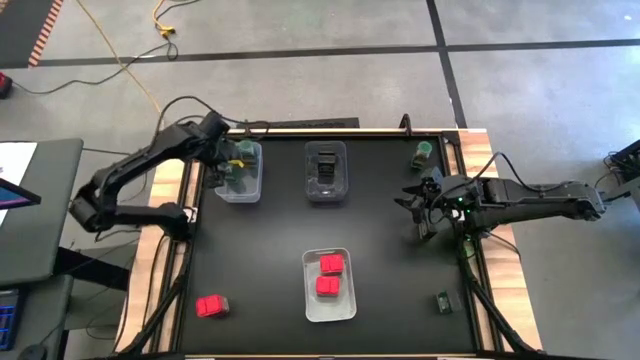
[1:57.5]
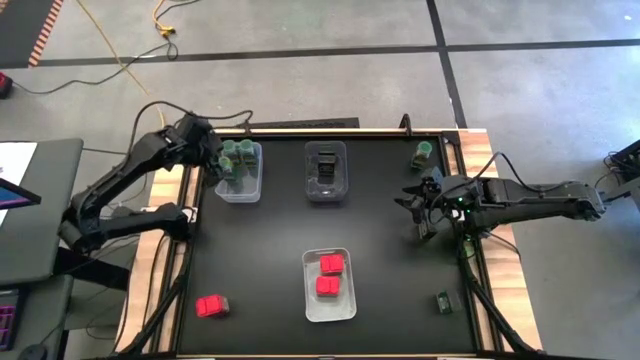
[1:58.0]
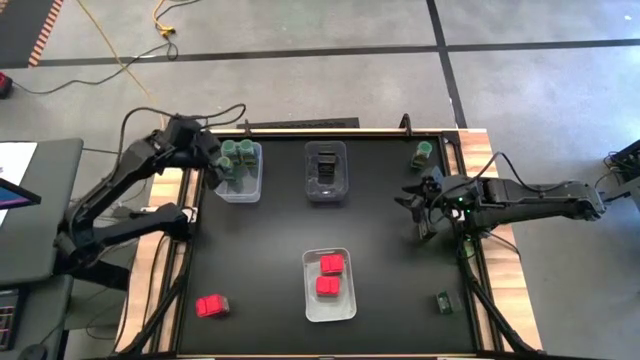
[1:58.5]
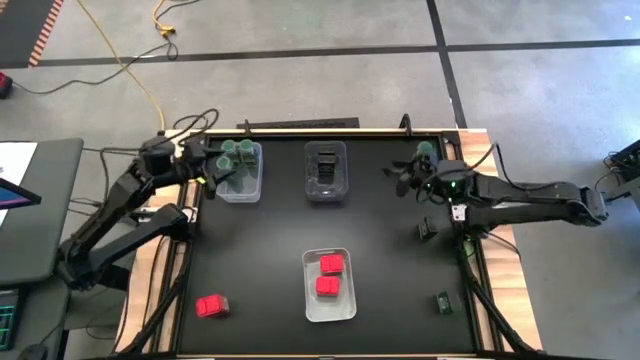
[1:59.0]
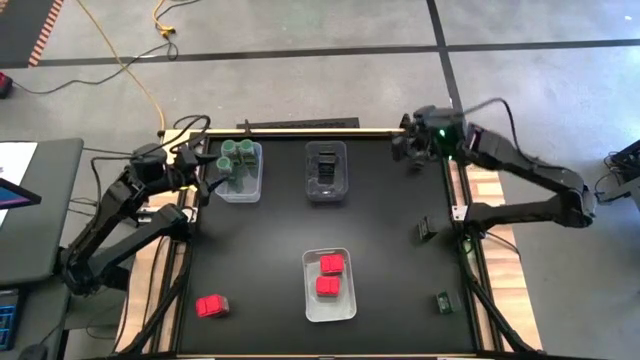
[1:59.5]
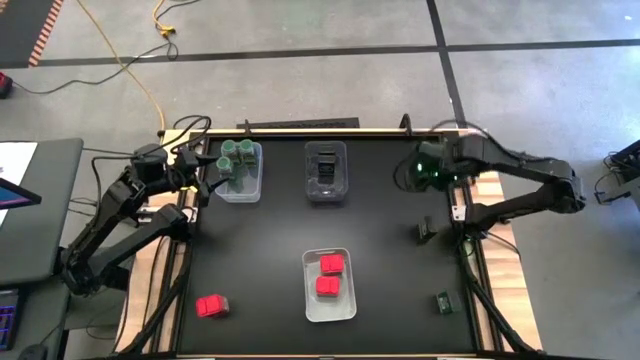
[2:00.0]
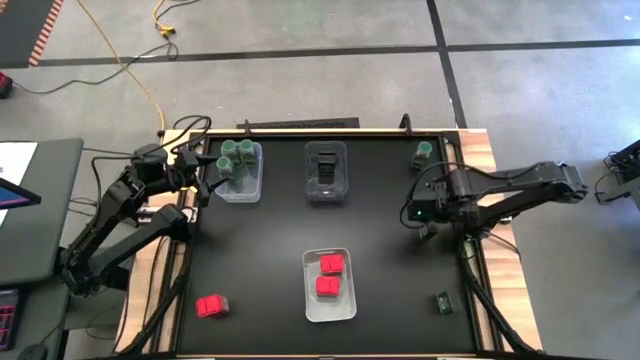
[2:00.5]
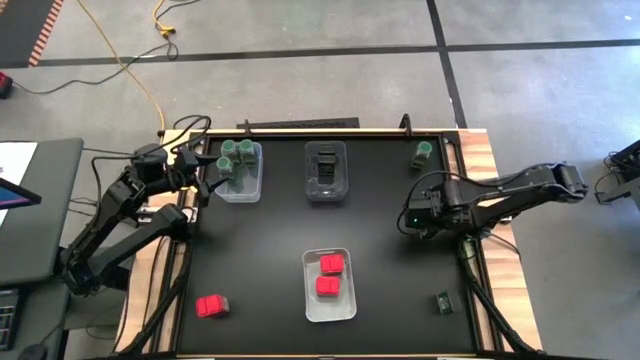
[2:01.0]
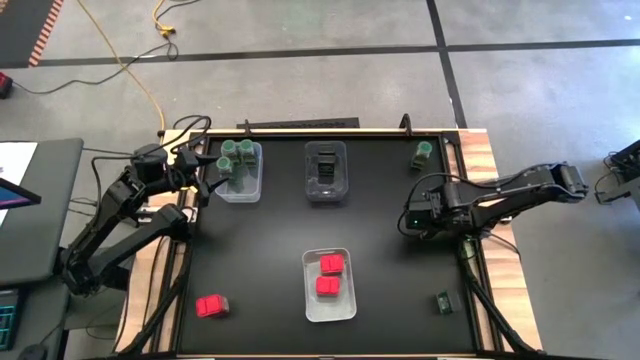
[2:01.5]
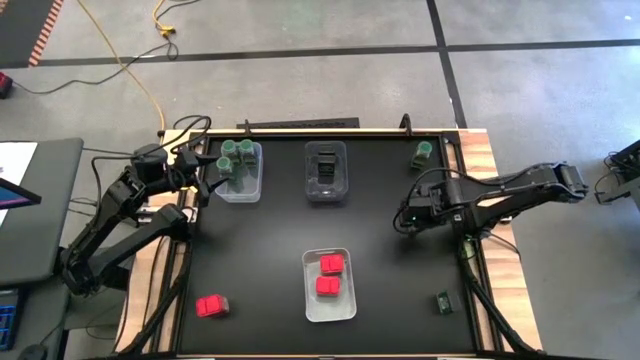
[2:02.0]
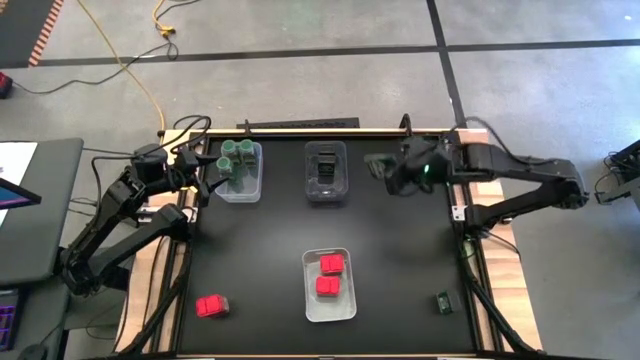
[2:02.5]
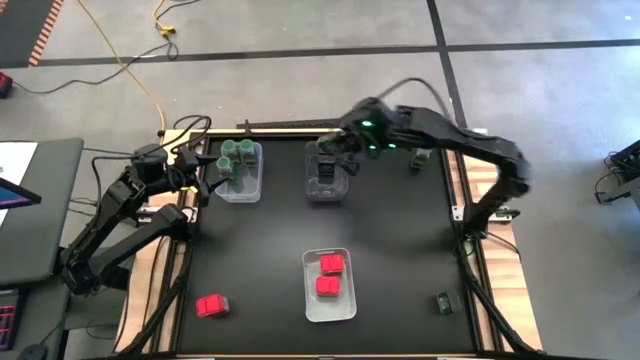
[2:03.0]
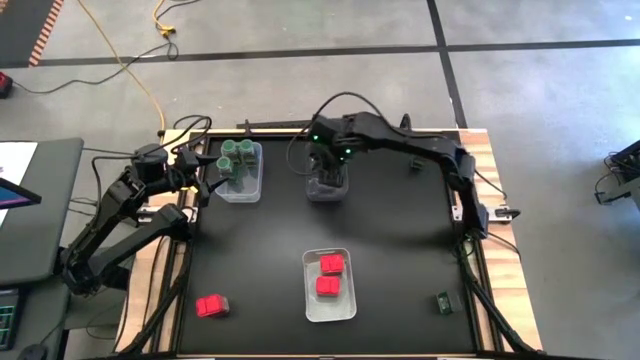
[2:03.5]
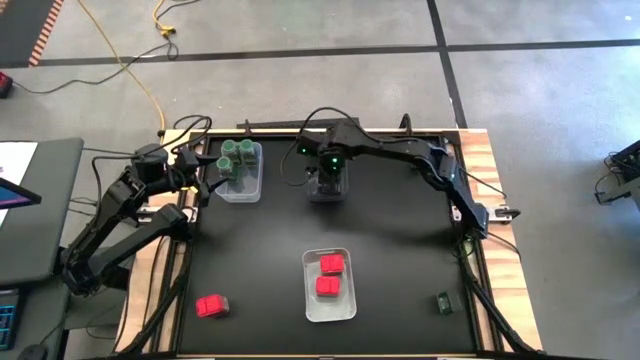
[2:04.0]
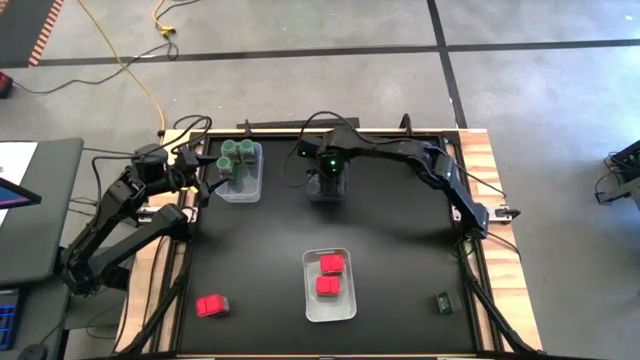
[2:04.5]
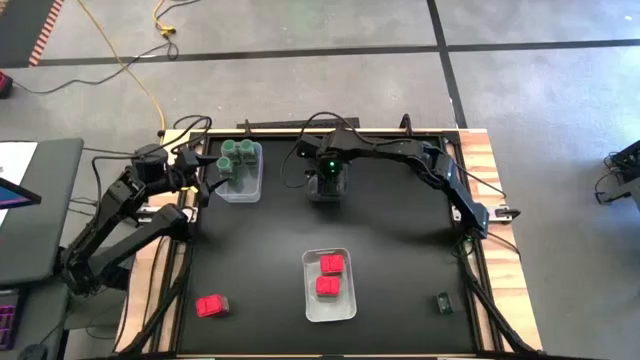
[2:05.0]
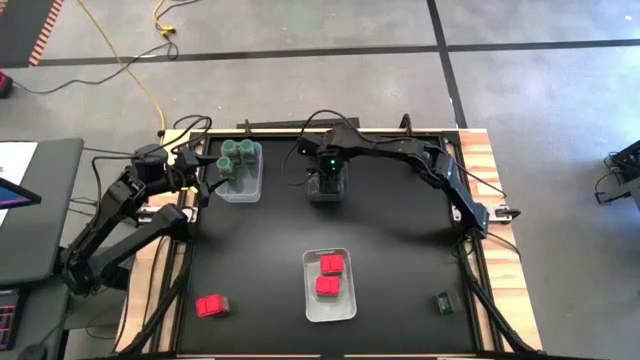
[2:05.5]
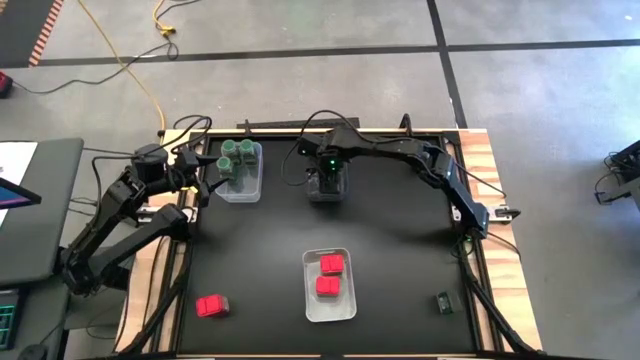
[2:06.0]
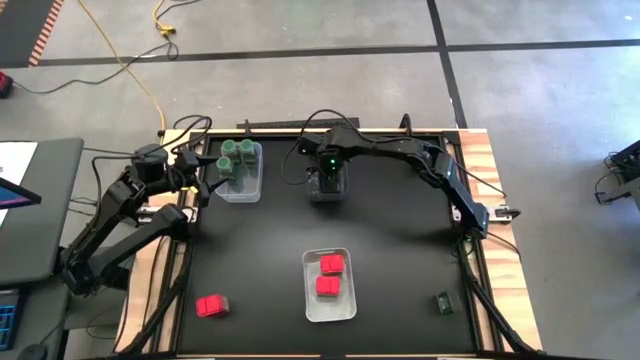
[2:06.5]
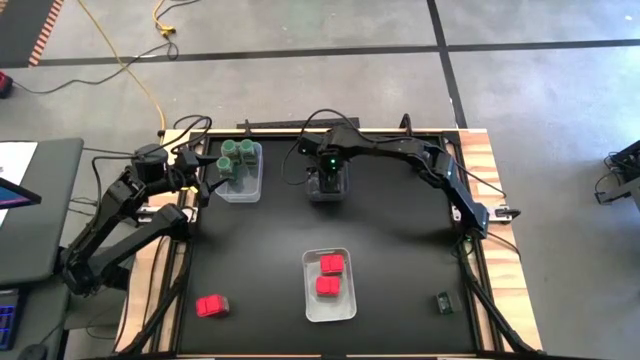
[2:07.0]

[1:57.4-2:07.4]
Task: Sort spices by type
Put the top black seasoning can into the black bin

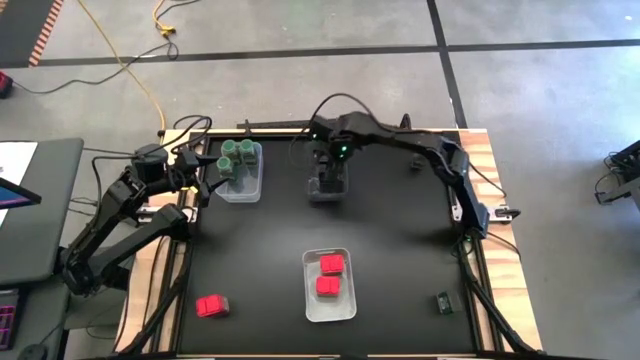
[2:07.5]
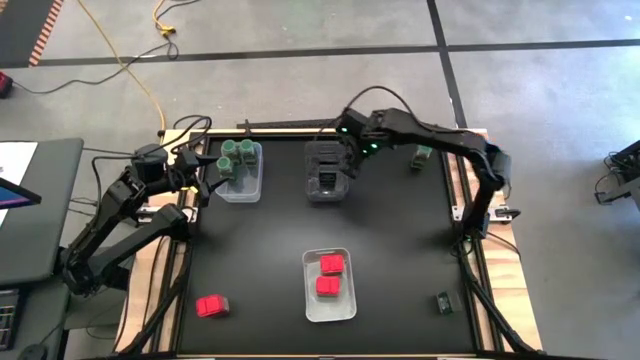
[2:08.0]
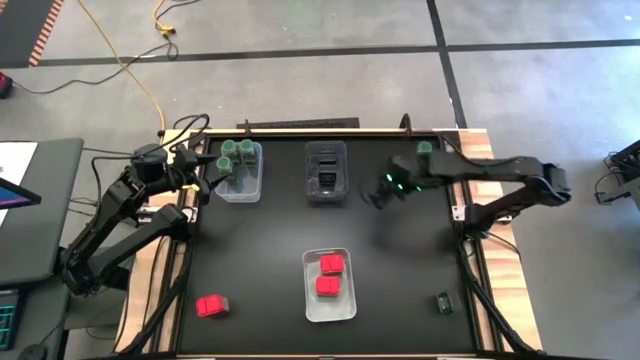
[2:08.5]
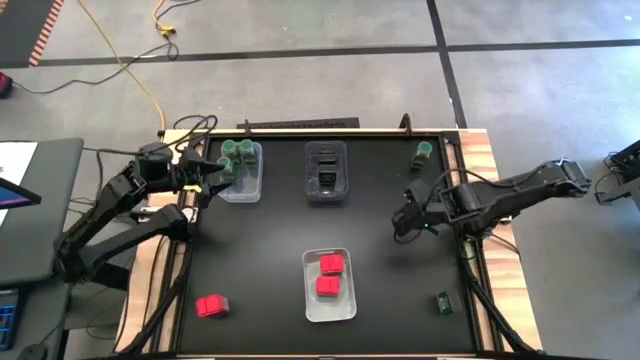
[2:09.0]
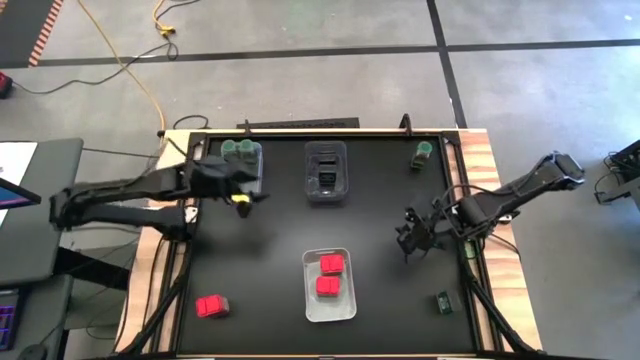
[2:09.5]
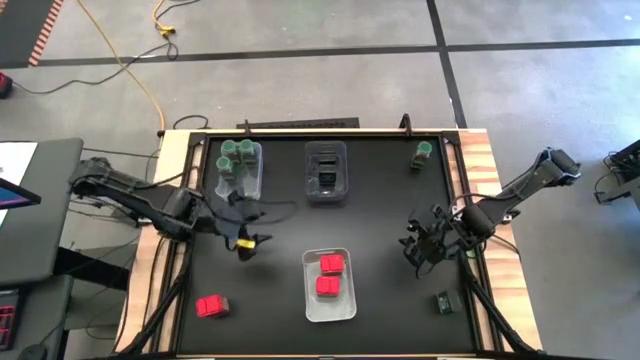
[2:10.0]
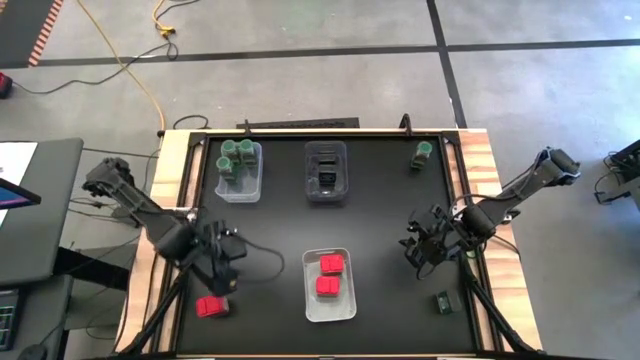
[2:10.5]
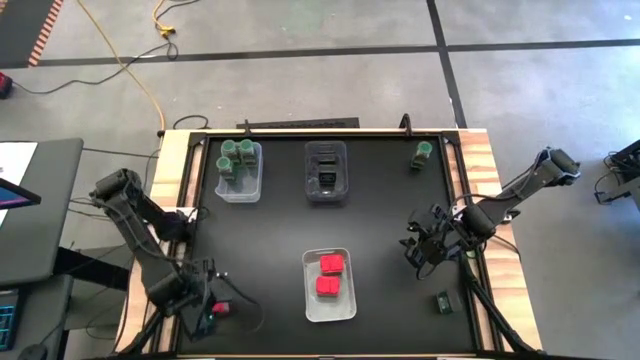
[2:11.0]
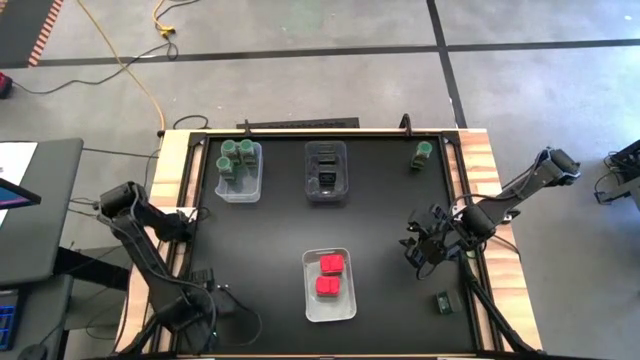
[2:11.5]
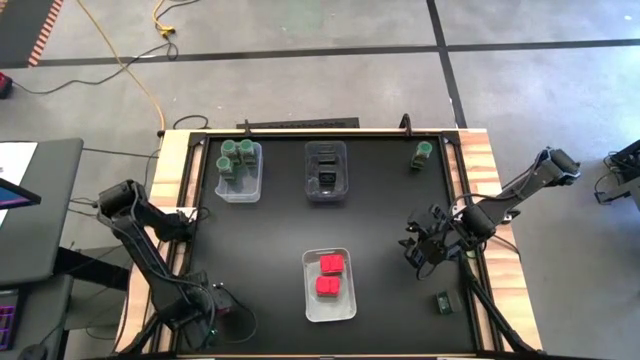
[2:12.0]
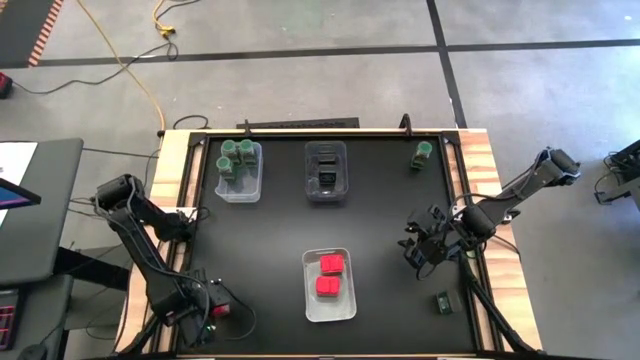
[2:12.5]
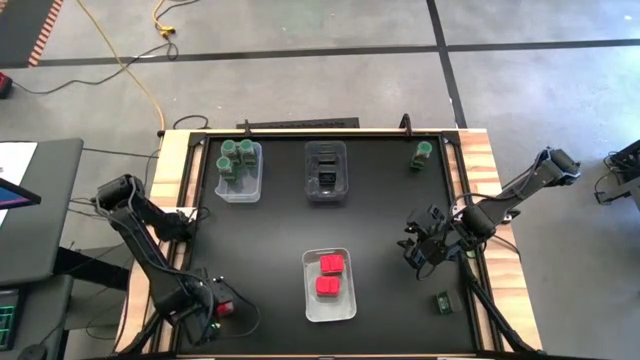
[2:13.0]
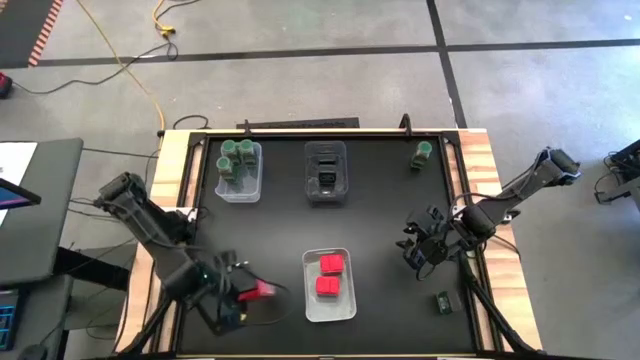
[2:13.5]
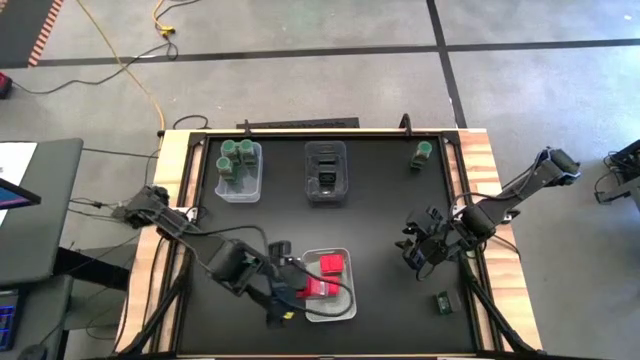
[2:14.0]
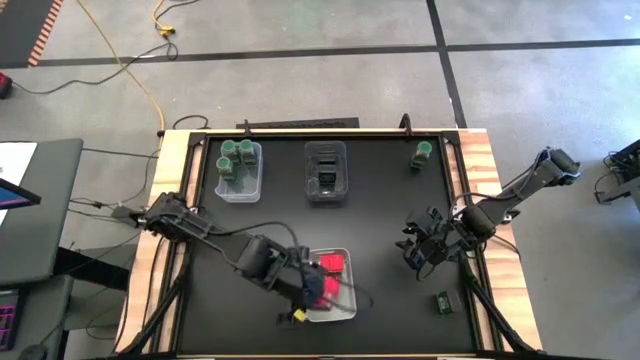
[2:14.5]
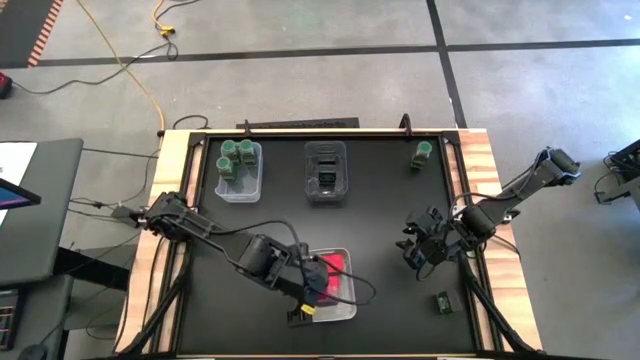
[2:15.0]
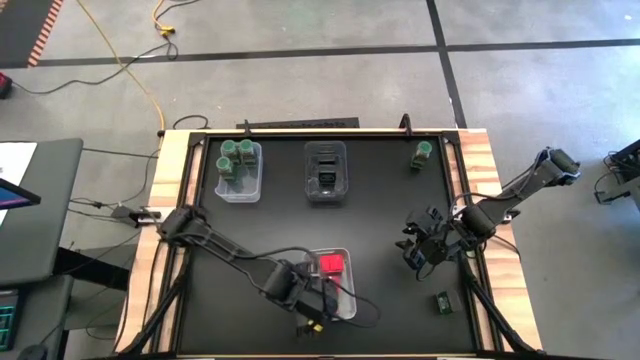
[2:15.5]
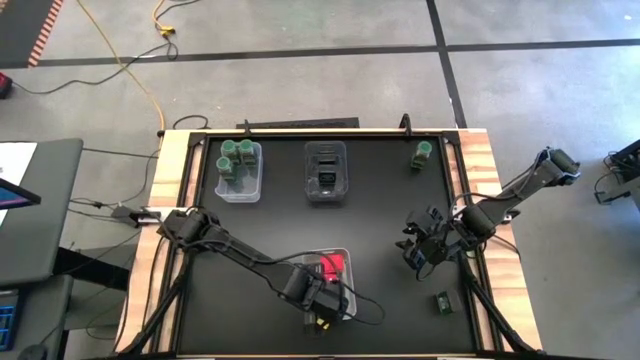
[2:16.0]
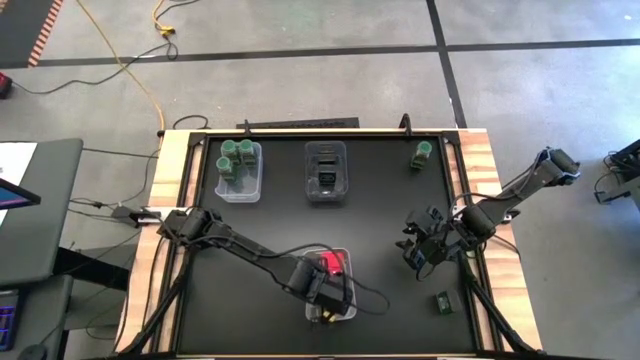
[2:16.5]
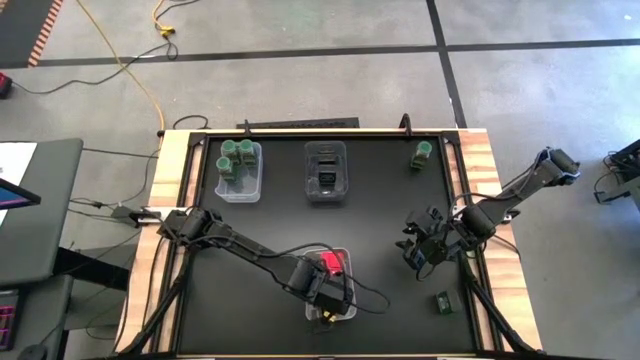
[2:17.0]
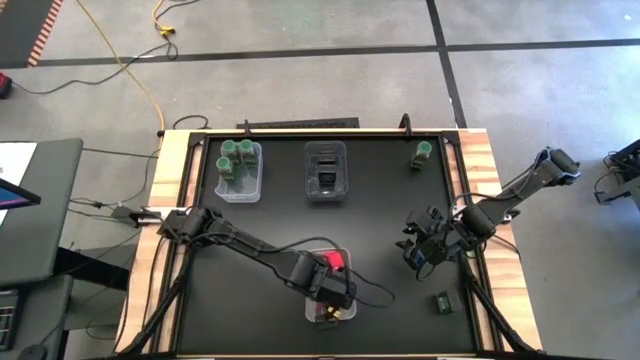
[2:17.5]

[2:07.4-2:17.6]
Put the red seasoning can into the white bin
